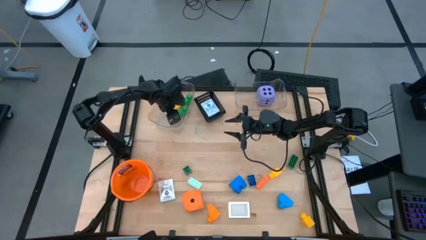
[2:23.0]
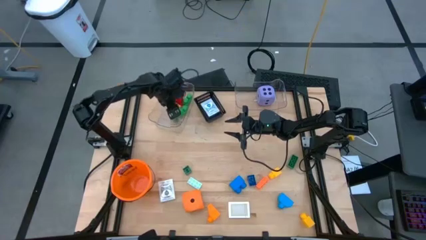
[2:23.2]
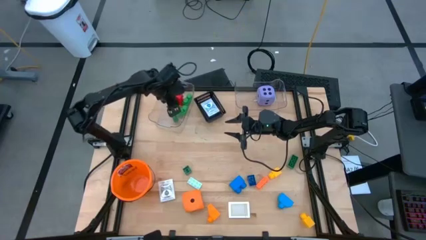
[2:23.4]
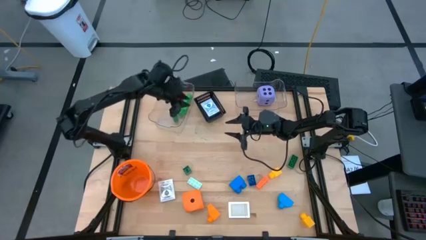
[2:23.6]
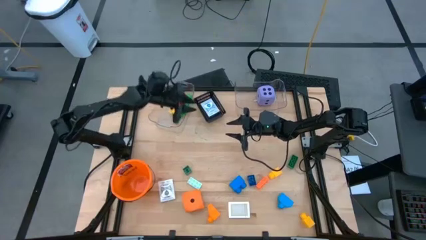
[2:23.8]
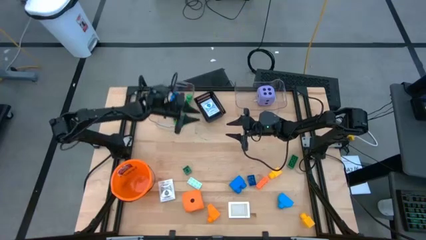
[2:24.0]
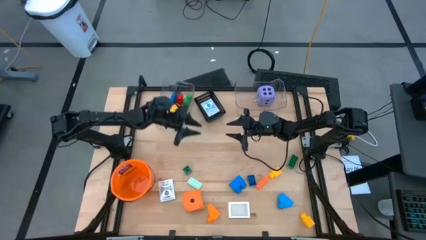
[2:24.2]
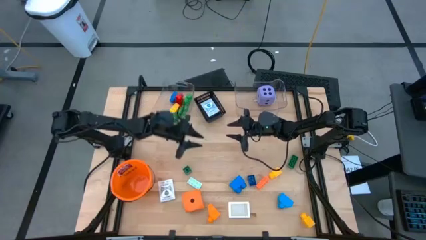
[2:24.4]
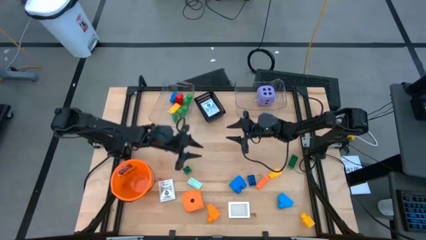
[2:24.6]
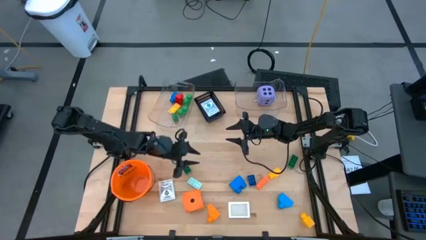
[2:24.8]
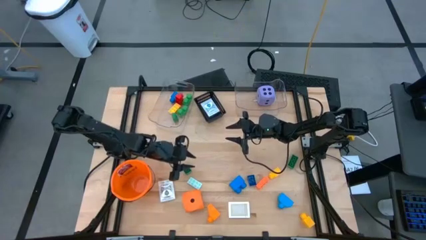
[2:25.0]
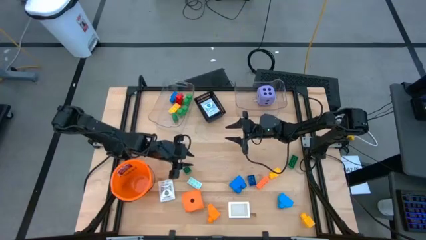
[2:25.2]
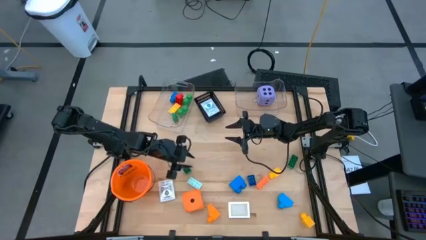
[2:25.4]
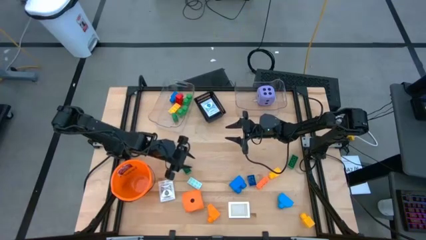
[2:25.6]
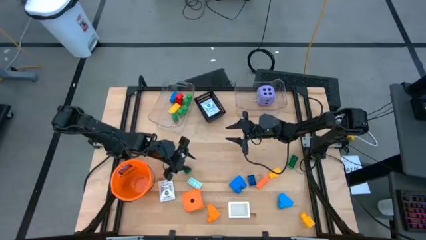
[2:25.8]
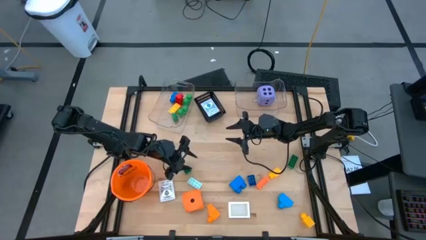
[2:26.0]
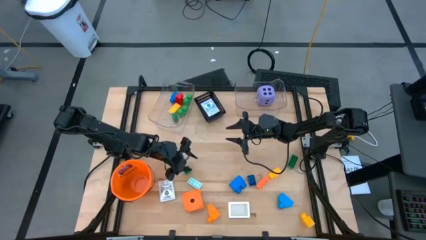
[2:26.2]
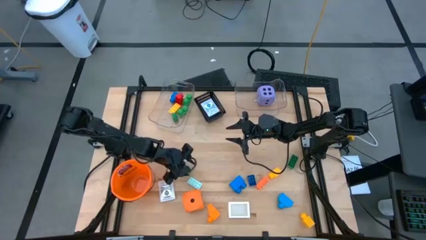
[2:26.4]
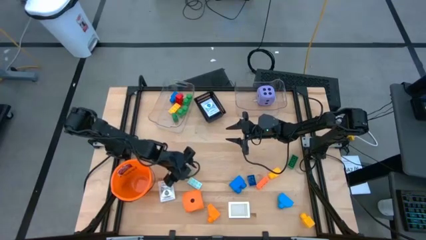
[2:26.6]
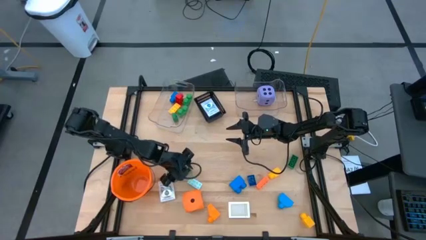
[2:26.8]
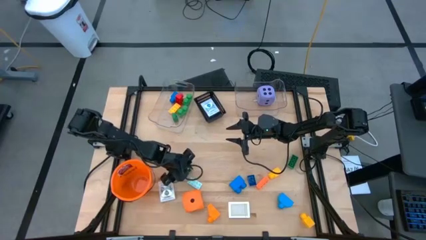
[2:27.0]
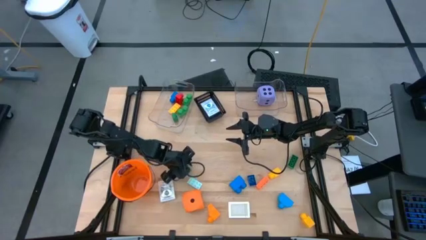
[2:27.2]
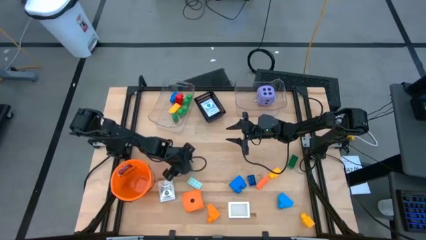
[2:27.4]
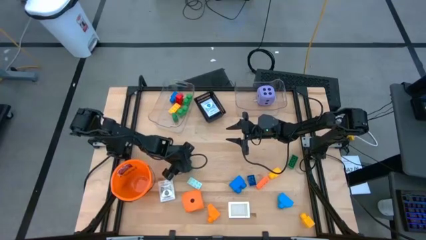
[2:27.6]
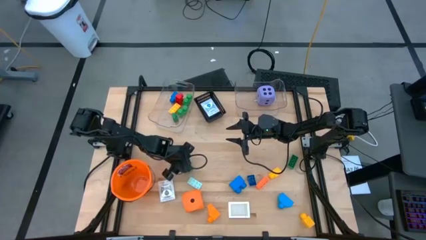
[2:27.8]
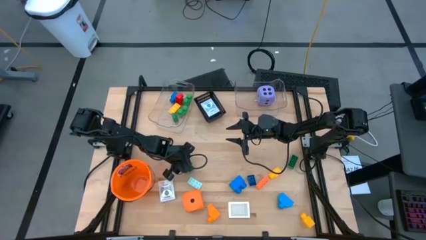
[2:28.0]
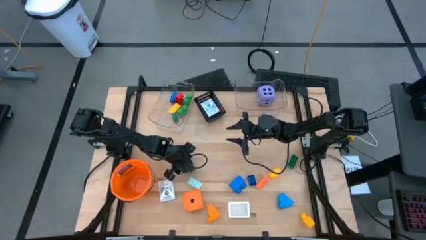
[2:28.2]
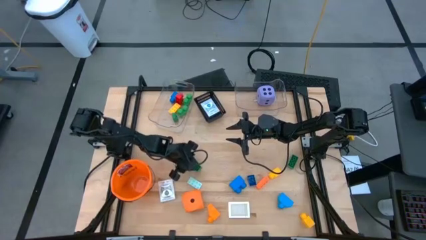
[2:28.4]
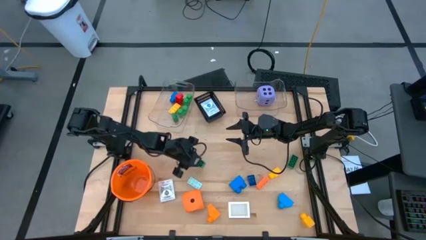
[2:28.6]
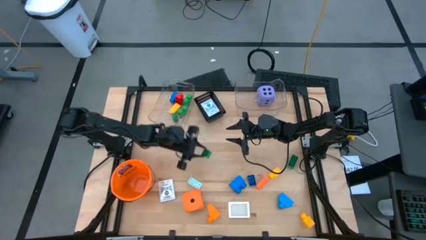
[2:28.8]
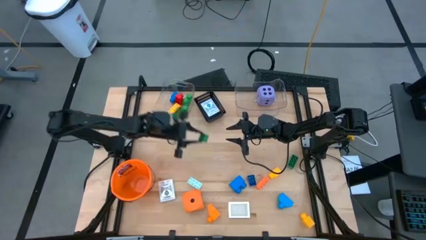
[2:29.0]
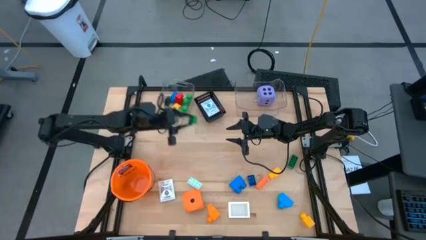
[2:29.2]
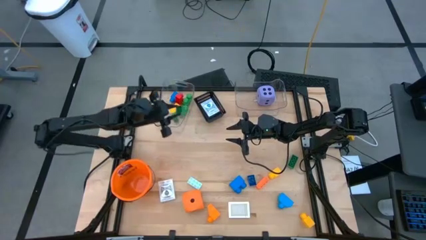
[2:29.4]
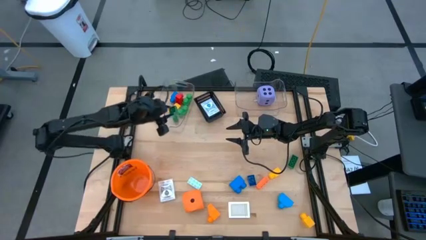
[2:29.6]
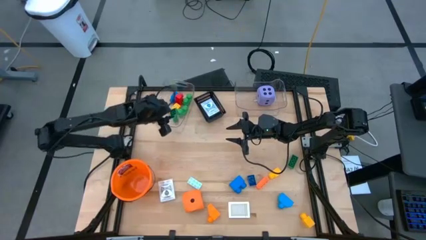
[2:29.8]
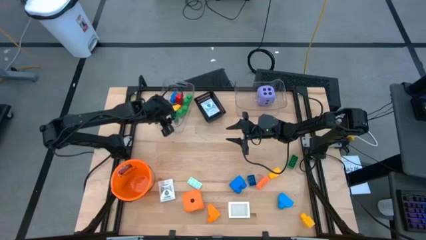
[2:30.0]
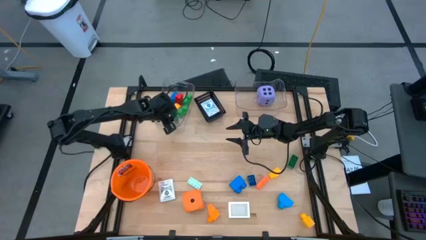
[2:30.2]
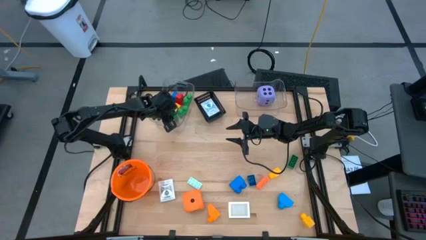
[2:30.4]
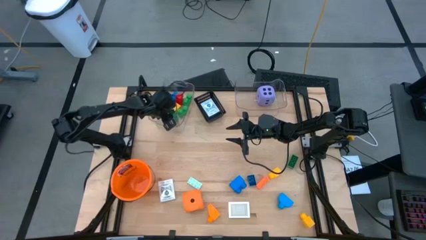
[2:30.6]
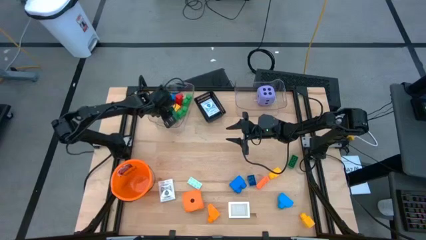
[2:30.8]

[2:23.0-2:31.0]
Task: Pick & Place Toys
Put the green gamepiece into the left transparent bin

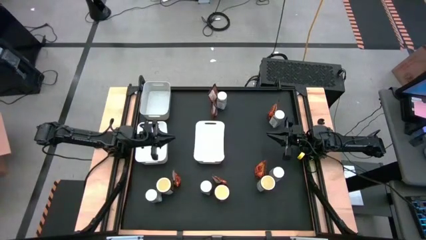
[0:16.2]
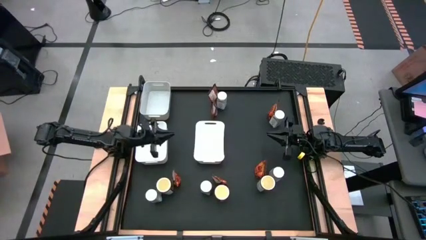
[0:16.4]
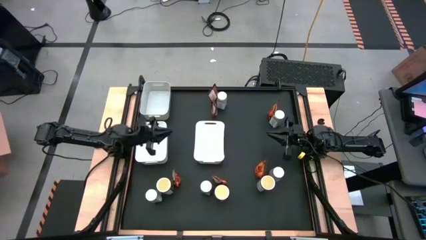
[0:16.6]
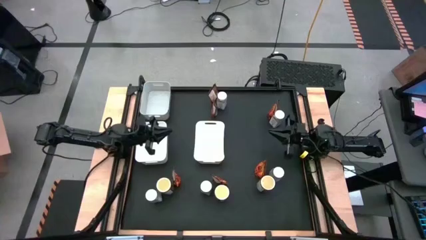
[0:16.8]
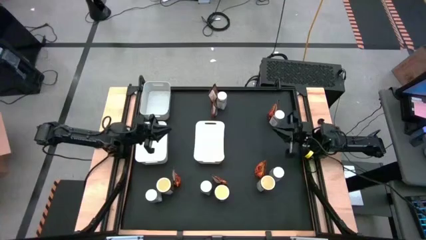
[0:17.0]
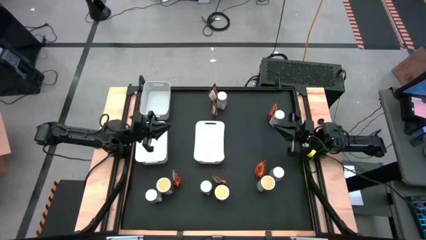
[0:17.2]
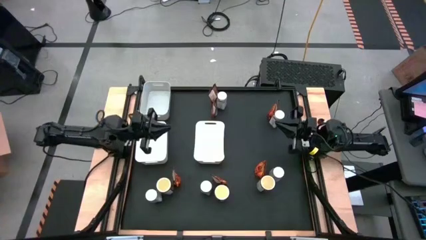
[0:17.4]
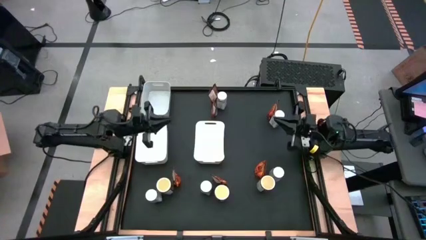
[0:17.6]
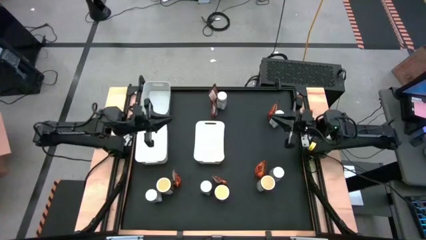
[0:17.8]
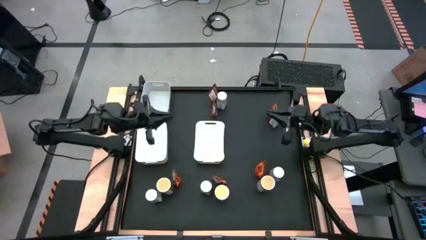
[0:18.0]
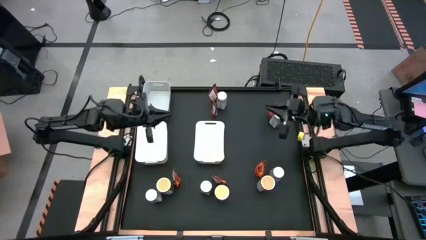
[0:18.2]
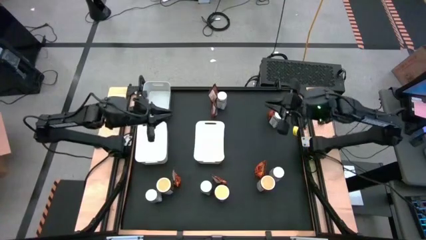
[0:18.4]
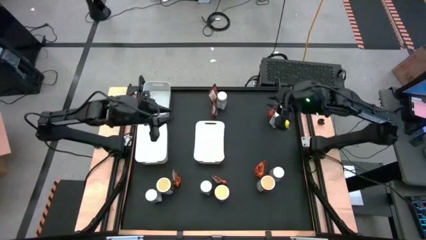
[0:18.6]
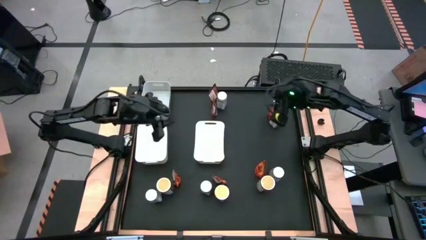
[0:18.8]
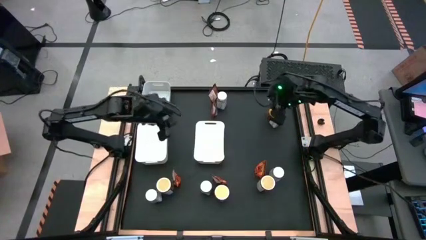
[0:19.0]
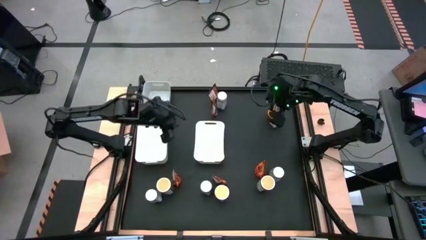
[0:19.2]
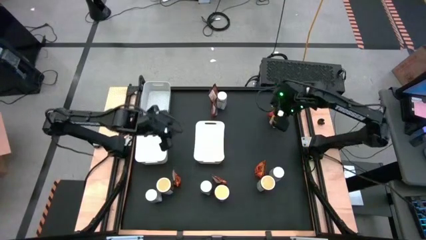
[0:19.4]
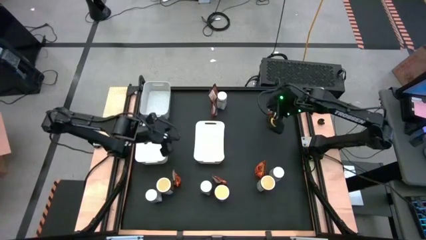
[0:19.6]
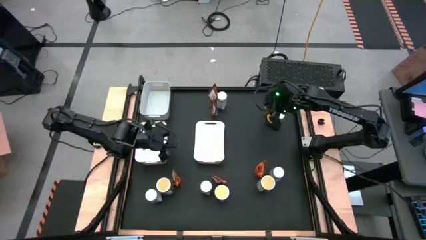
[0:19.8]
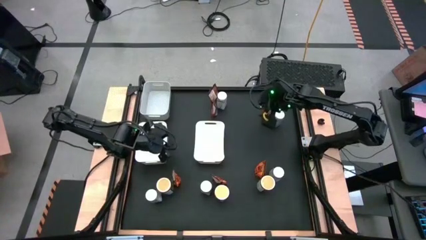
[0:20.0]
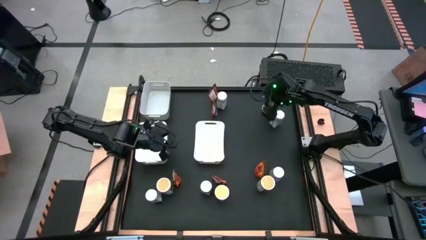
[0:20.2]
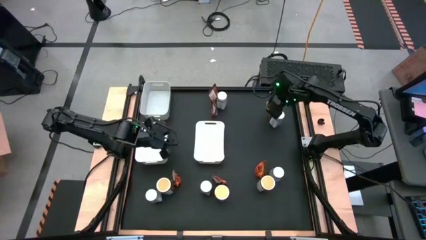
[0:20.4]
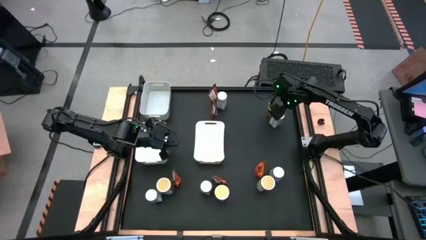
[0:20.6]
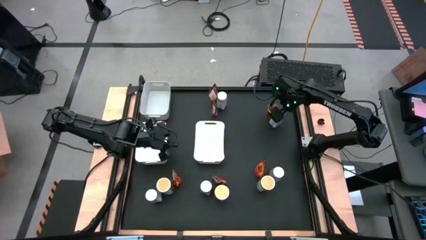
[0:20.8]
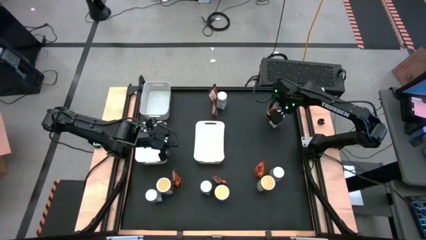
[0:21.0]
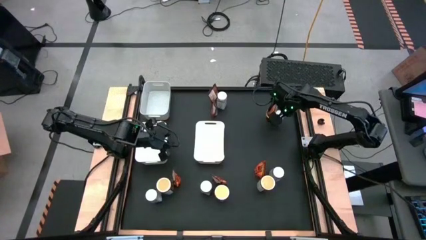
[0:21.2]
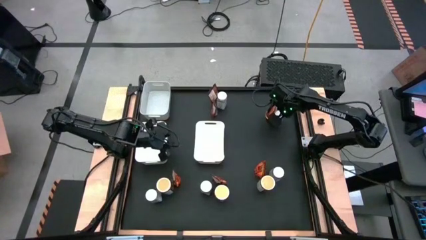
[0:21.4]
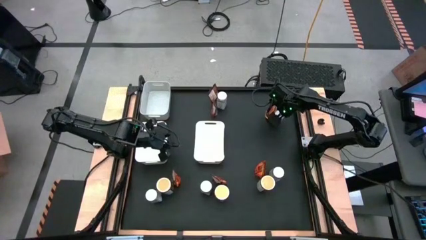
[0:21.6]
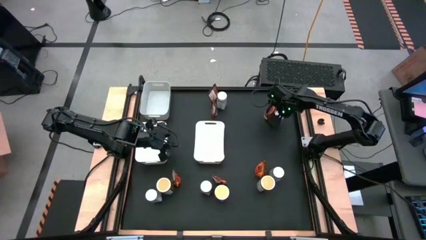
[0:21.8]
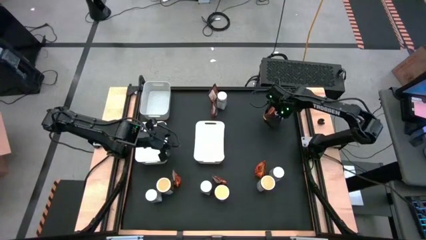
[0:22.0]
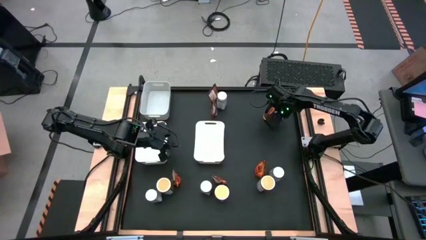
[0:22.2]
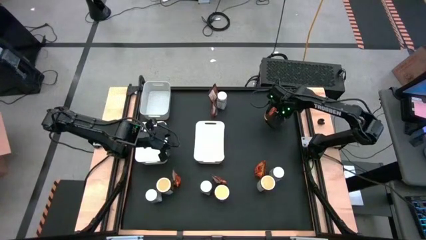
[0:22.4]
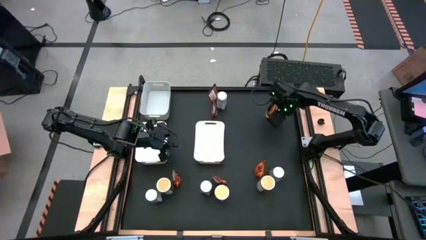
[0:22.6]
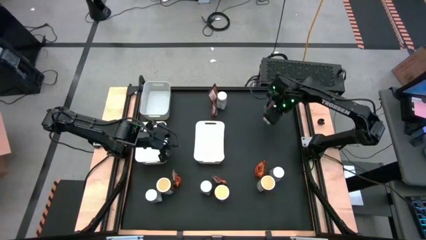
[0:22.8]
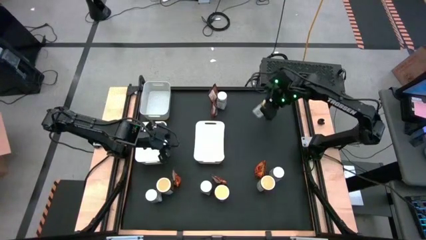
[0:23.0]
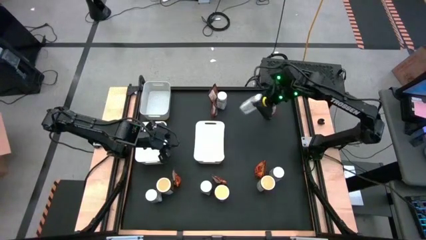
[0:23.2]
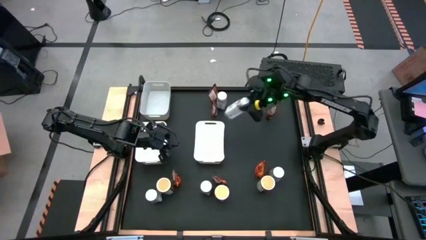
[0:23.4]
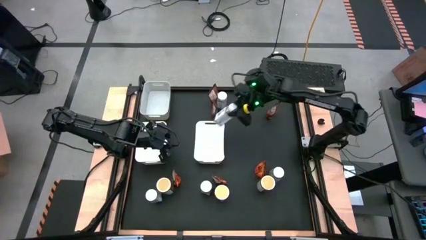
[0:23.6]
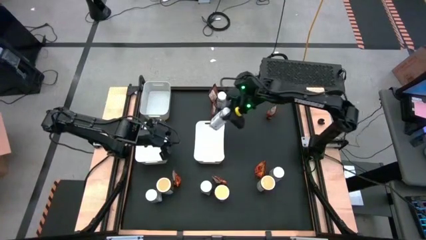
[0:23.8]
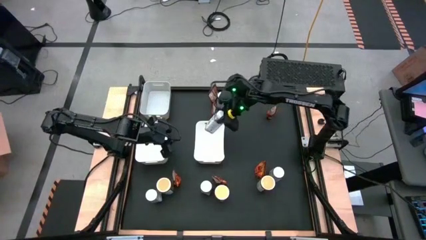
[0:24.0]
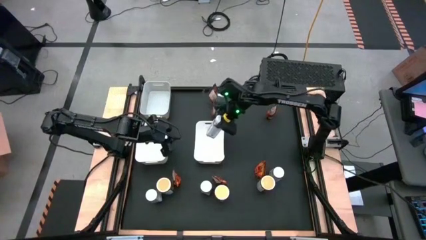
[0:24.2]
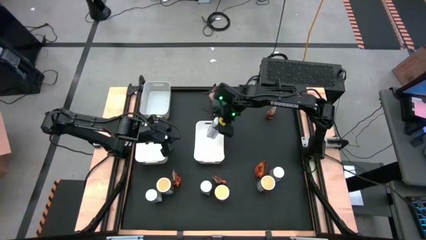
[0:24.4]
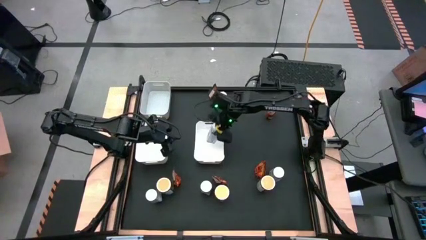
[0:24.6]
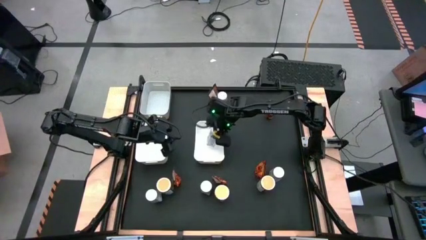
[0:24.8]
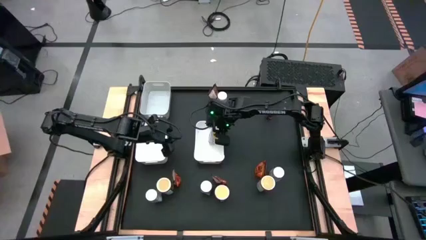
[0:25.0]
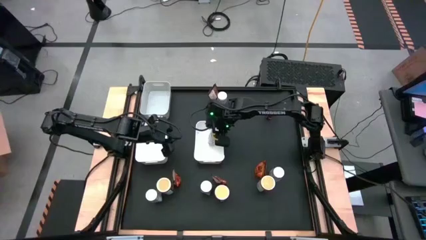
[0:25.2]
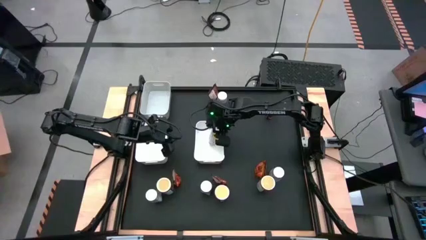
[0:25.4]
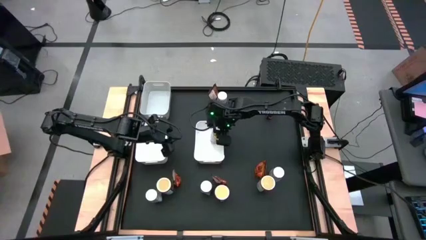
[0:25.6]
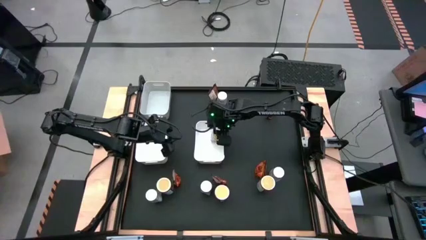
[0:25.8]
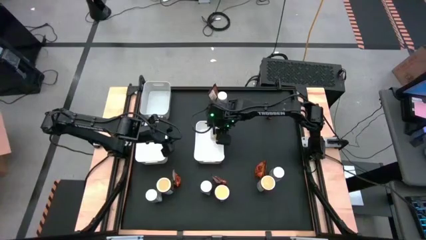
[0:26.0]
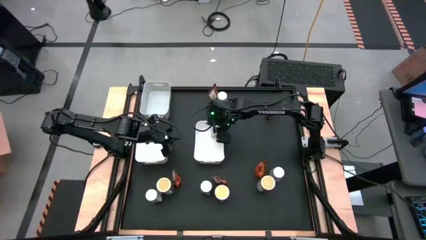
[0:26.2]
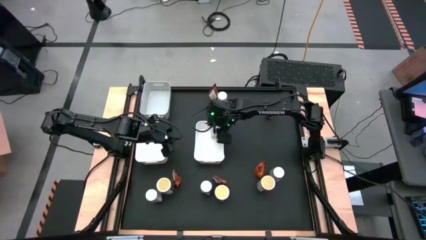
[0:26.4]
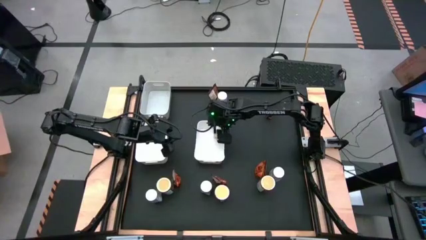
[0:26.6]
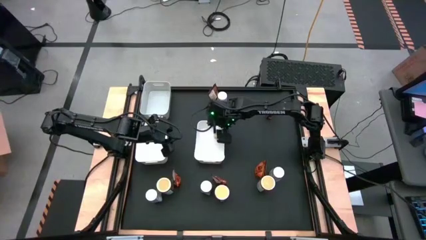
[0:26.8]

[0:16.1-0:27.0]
Task: Sort spices by type
Put the white seasoning bottle into the right white bin
